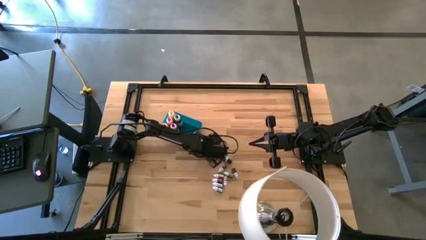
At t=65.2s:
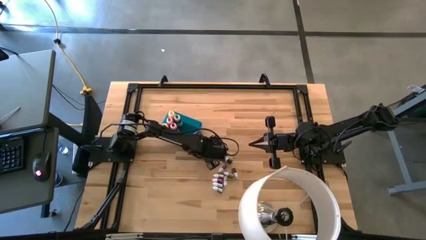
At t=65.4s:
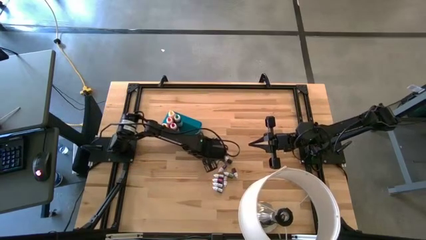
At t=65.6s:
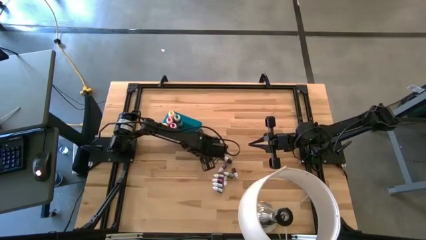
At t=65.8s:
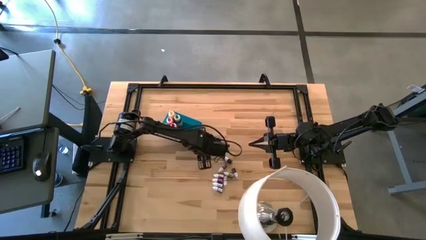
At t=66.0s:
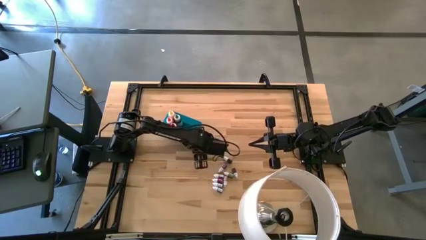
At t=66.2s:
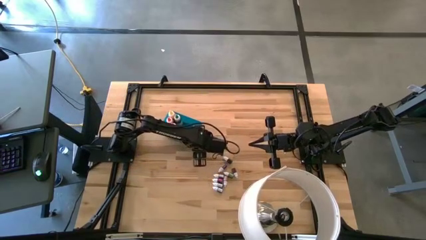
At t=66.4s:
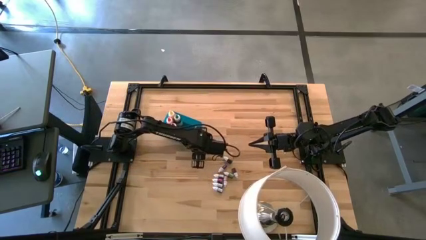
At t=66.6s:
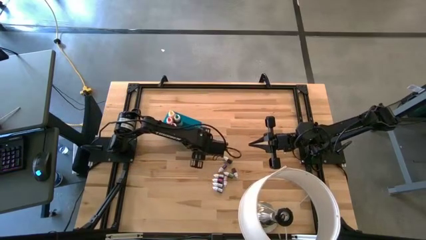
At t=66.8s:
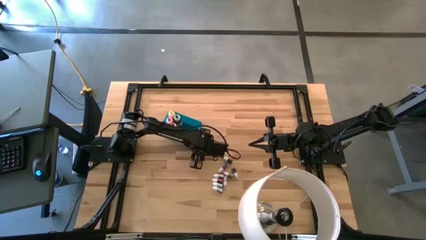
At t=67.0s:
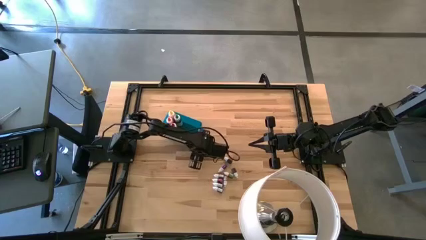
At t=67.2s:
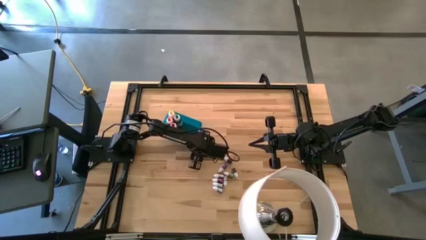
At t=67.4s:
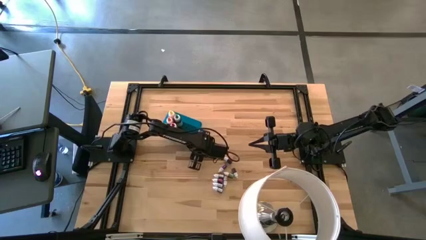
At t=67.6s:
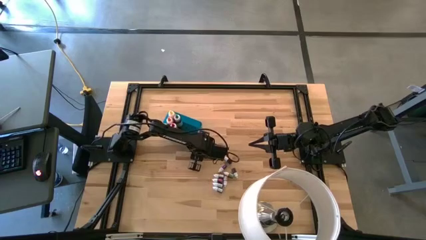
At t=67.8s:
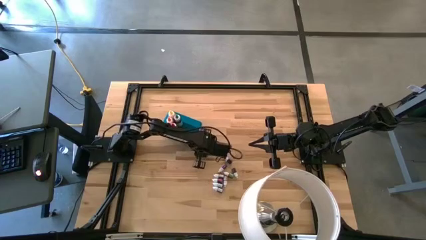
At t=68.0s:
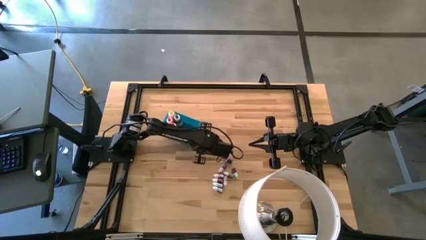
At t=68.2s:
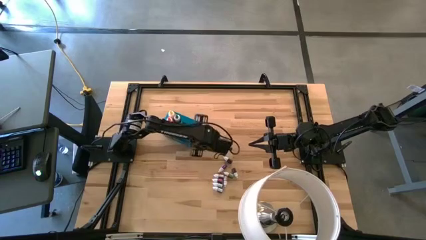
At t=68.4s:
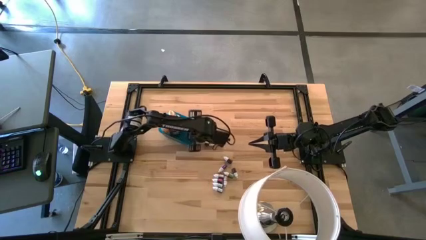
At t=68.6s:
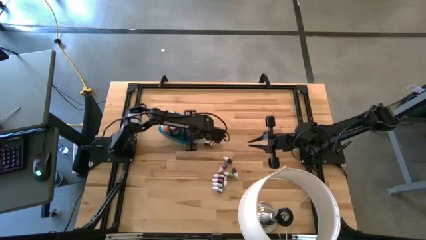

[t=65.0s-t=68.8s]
Task: Pick & Place food coloring
Put the small dark green food coloring bottle into the blue bin

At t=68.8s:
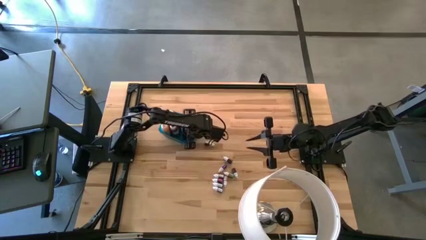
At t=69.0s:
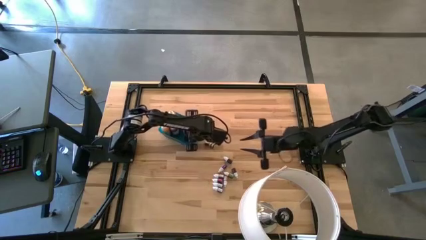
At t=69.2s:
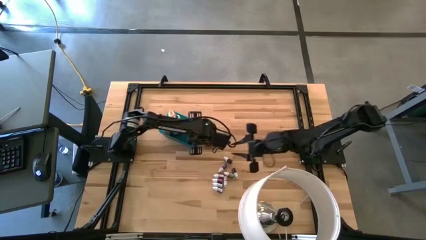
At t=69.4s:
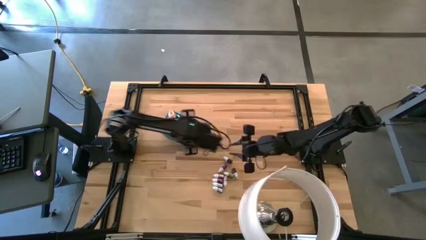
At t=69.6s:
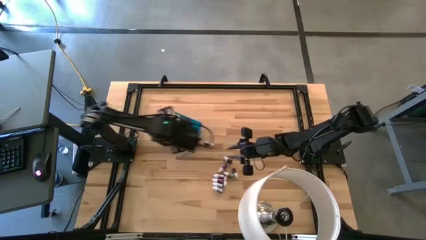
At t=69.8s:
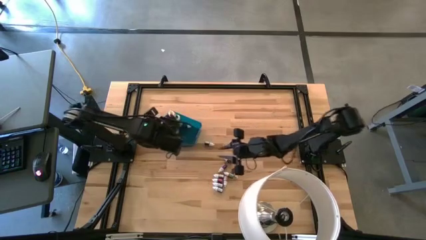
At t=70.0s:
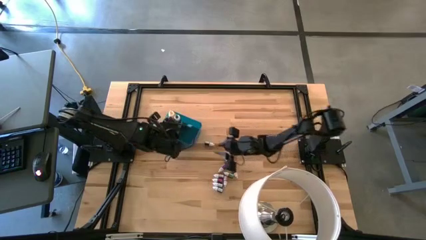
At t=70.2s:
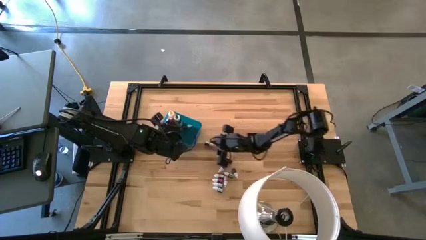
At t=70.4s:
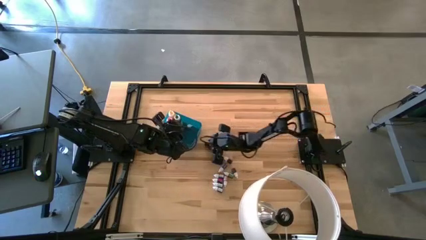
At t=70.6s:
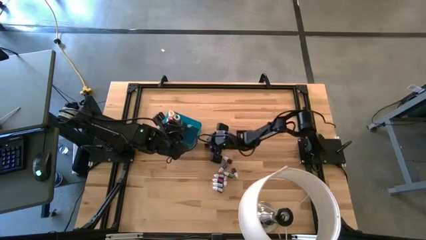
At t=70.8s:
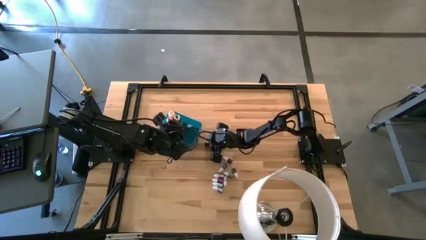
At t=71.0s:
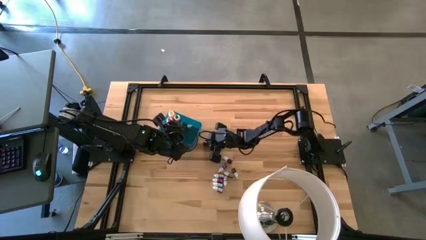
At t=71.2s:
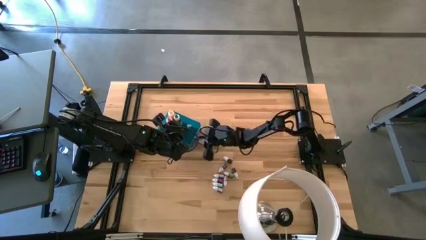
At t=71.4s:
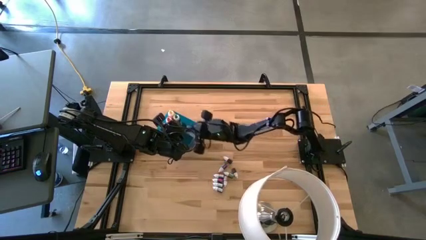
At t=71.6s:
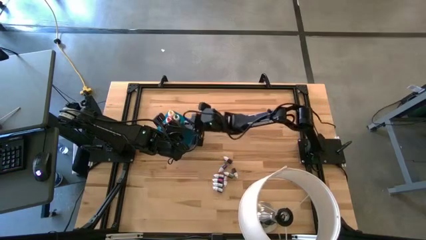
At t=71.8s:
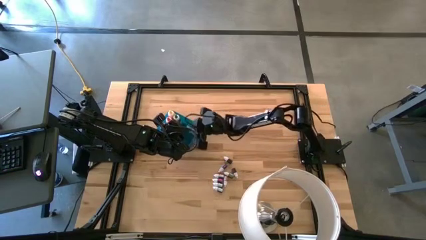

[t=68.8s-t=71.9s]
Put the small red food coloring bottle into the blue bin

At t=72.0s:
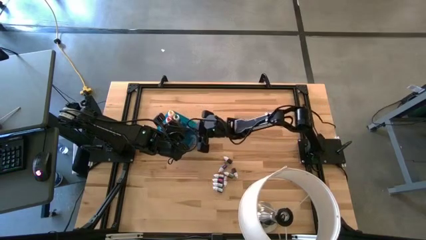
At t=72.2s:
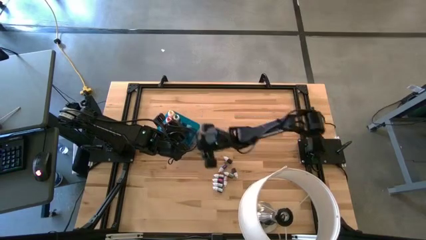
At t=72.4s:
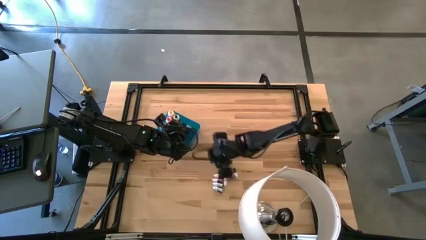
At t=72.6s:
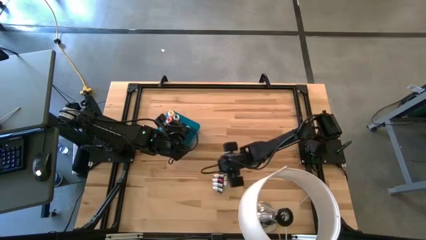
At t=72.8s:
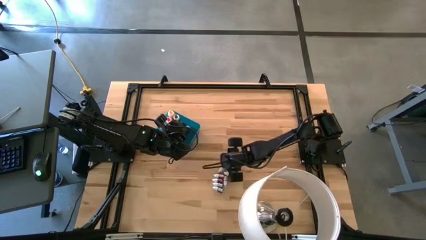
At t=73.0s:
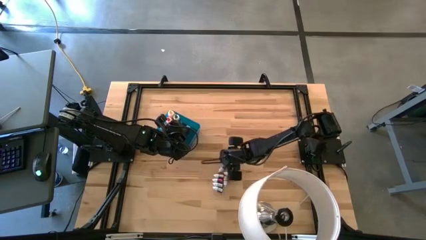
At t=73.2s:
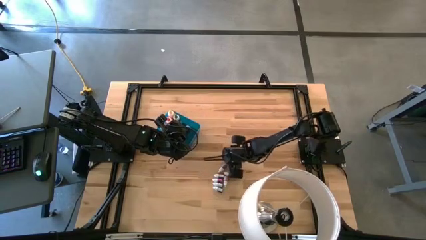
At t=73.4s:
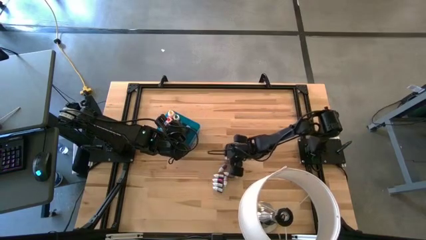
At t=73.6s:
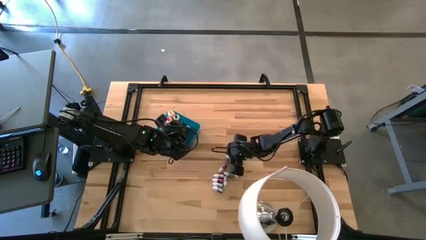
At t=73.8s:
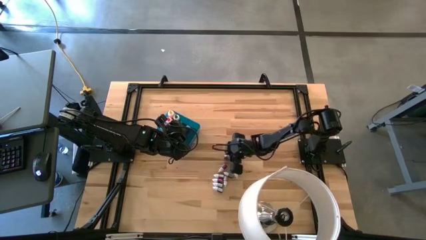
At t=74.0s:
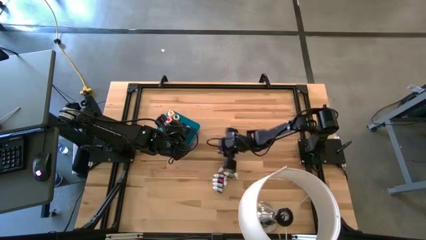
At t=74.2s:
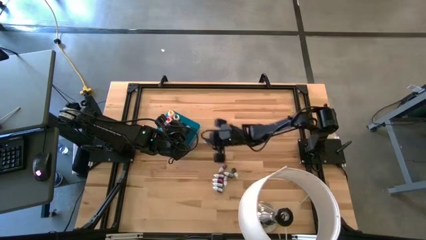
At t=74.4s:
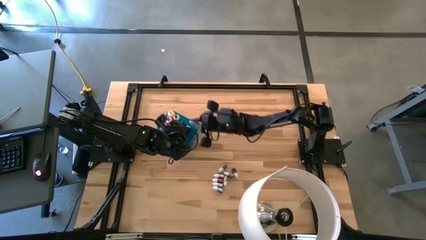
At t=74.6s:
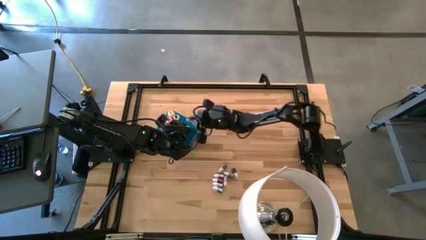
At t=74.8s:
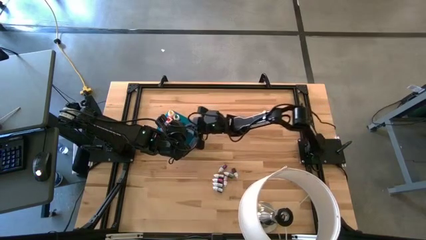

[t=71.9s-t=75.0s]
Put the small black food coloring bottle into the blue bin

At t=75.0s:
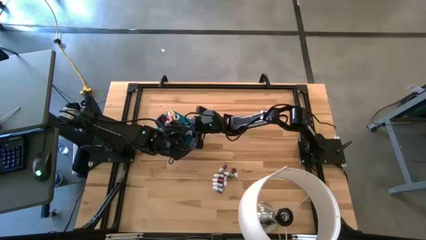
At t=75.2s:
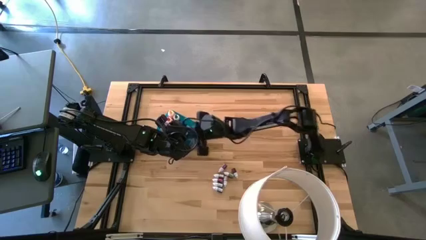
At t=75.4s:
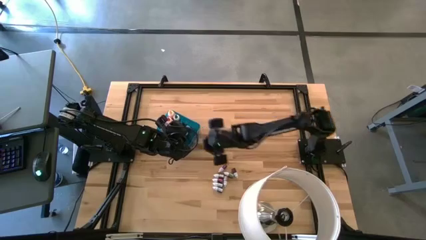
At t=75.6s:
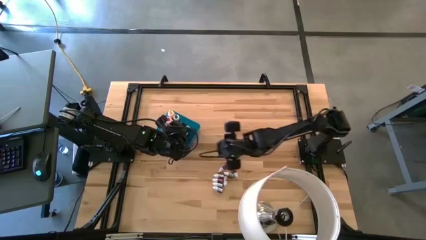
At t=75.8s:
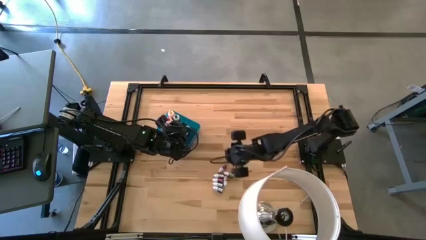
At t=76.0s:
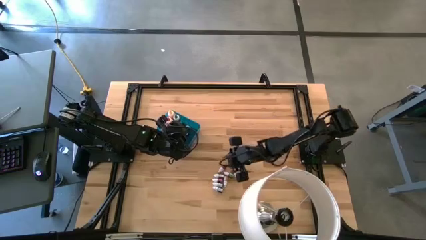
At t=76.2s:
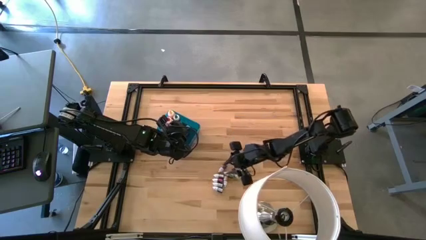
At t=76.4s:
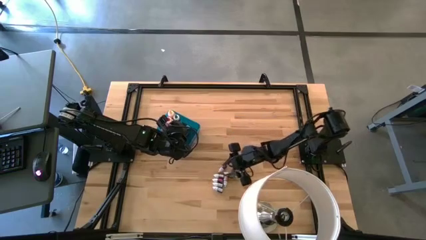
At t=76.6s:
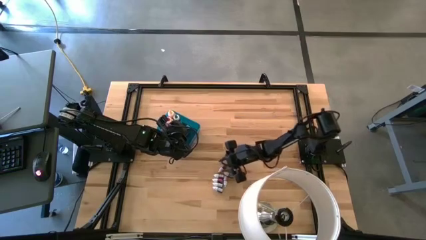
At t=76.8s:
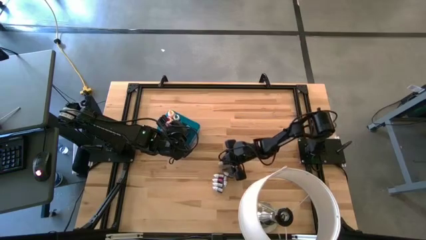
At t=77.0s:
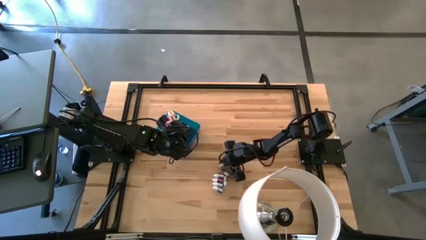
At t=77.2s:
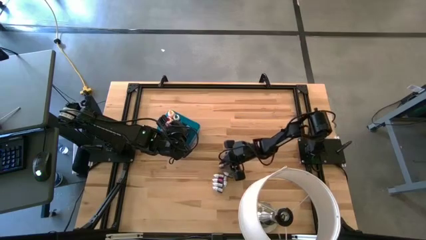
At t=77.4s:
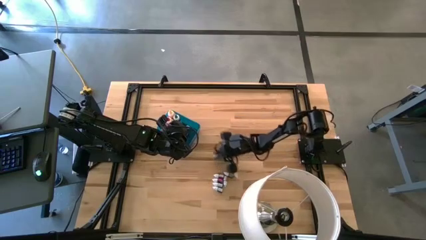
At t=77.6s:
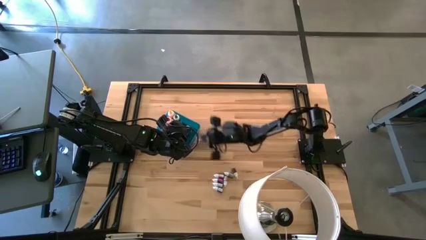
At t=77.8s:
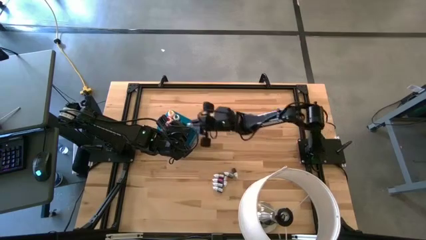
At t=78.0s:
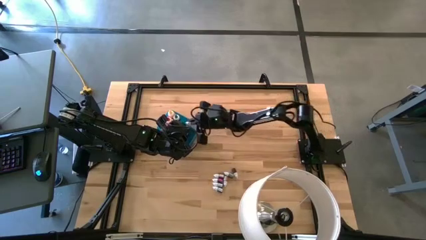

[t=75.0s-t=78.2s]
Put the small purple food coloring bottle into the blue bin

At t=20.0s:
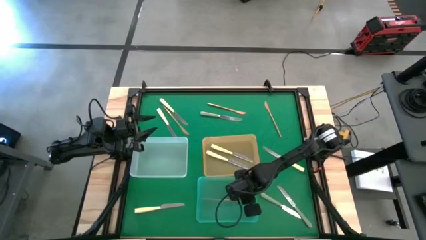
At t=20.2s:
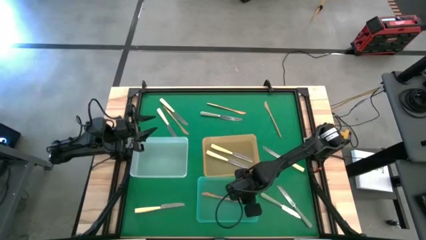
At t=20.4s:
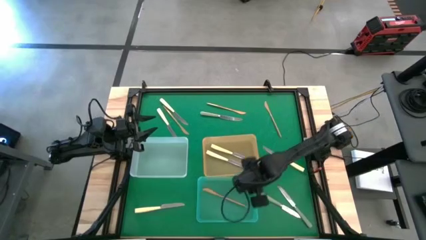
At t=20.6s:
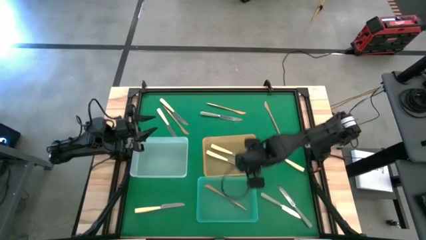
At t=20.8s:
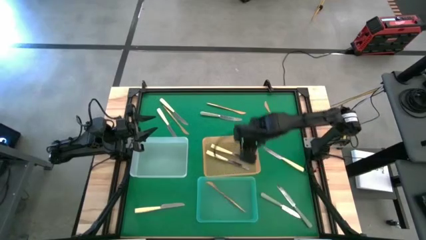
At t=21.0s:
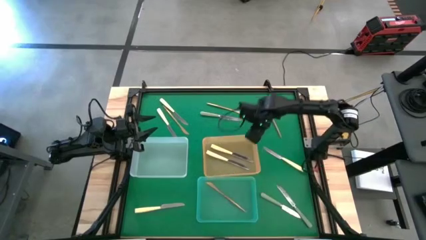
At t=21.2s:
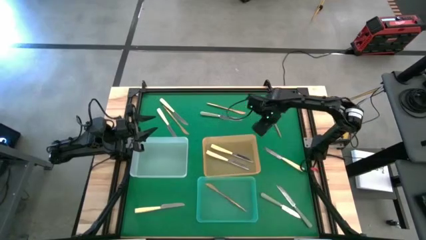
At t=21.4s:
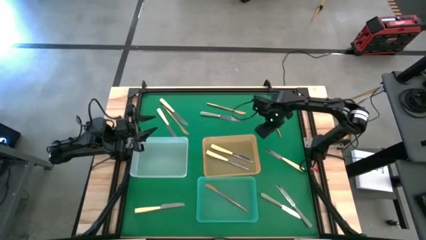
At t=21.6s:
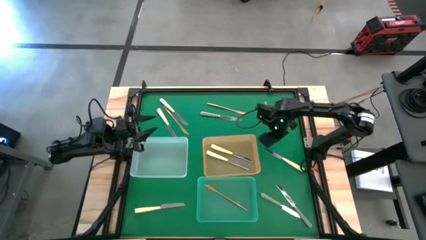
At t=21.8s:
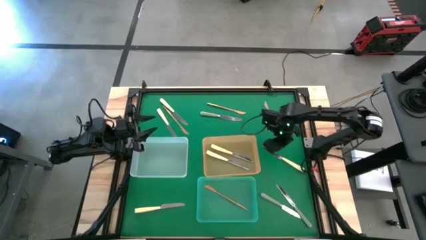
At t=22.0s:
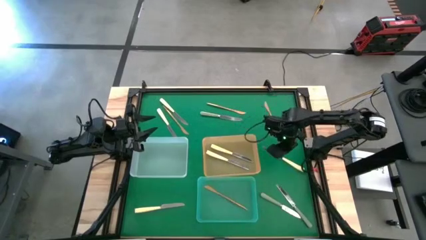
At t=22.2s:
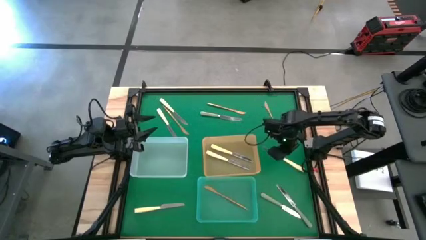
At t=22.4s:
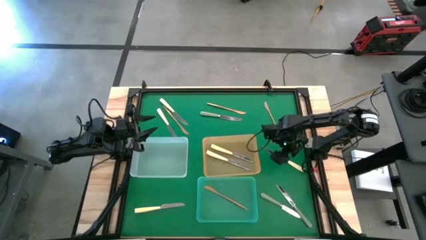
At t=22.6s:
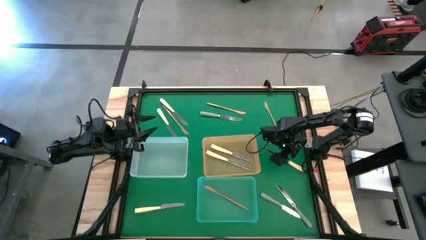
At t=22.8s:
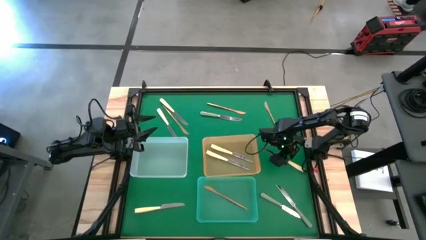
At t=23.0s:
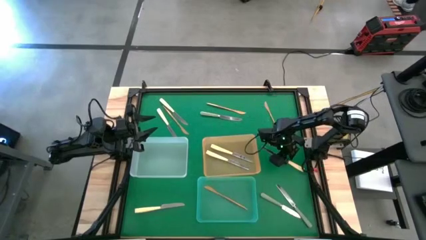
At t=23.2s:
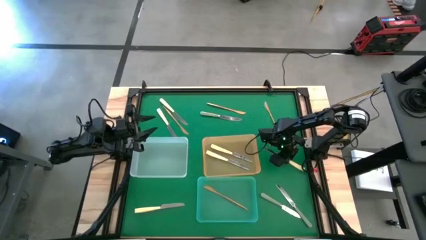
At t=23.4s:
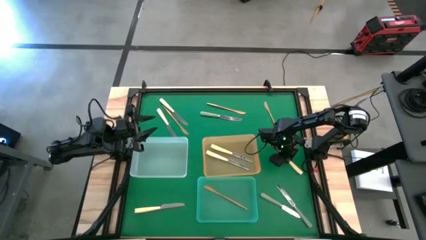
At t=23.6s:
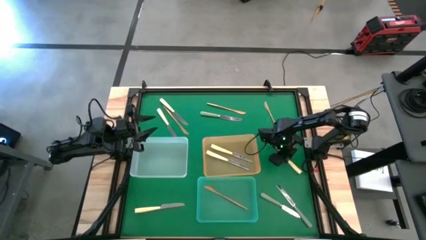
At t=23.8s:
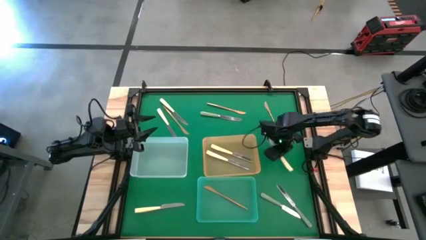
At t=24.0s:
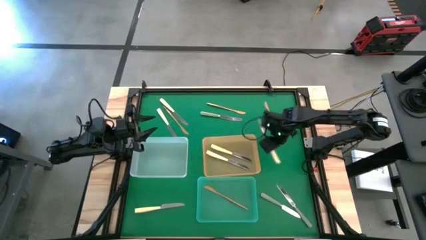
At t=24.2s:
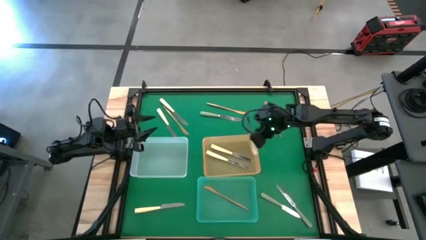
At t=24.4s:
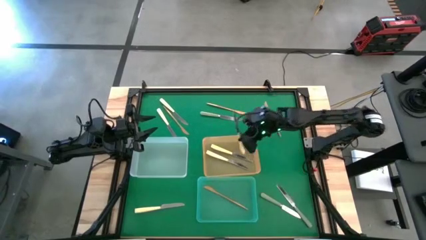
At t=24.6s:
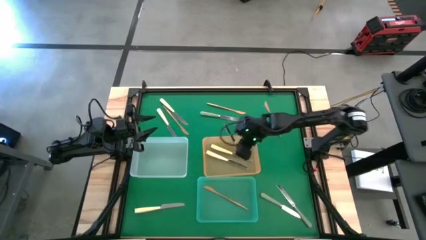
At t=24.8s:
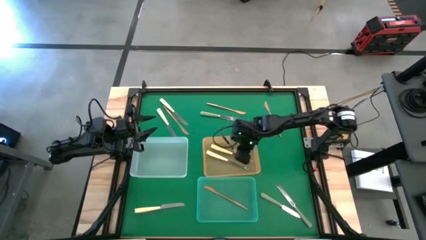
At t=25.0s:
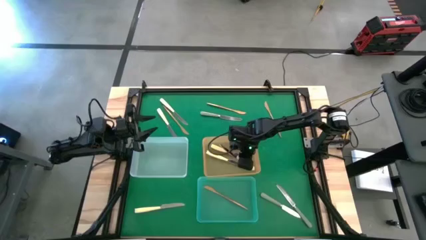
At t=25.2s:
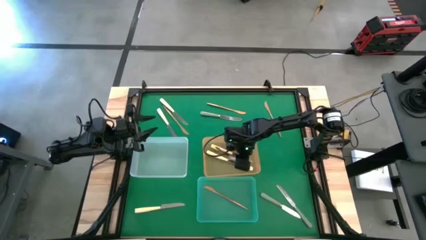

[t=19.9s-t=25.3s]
Task: Sort silverware by color (type)
Put the yellow table knife into the orange bin
